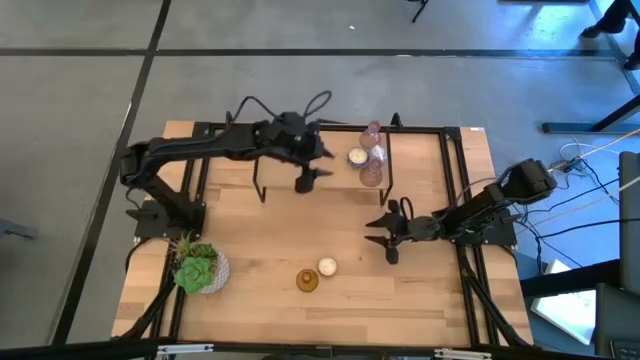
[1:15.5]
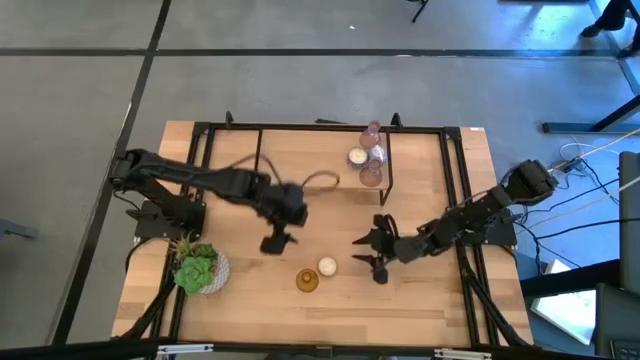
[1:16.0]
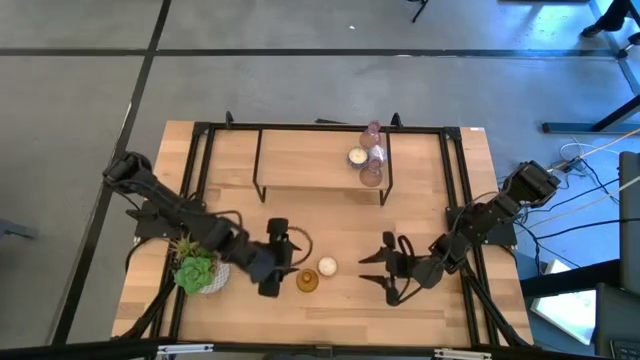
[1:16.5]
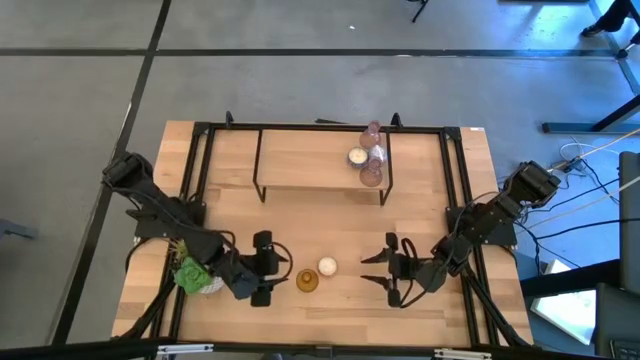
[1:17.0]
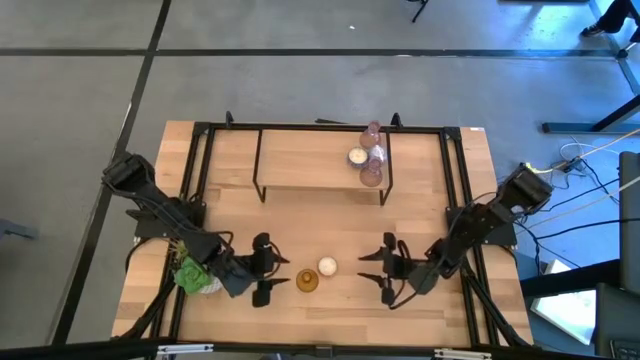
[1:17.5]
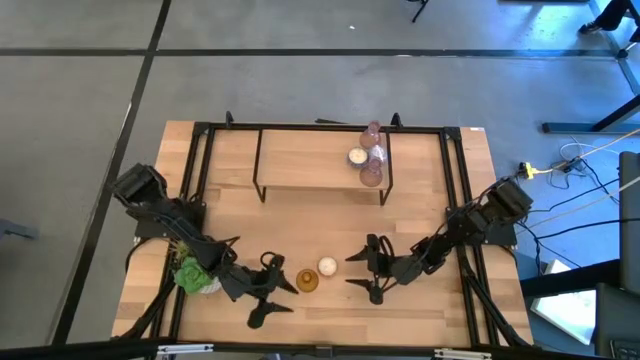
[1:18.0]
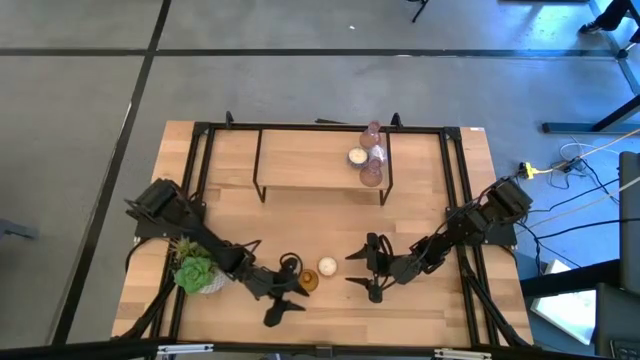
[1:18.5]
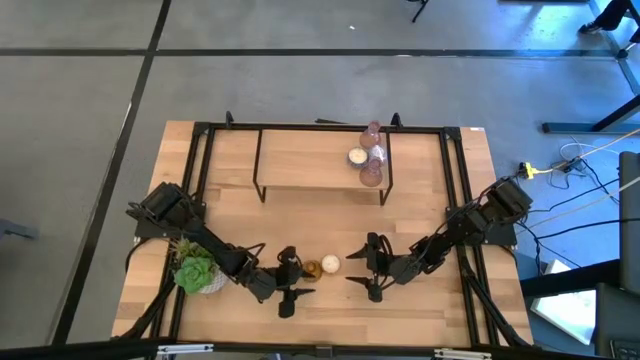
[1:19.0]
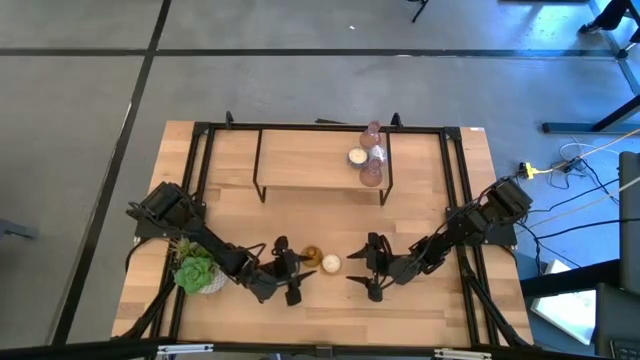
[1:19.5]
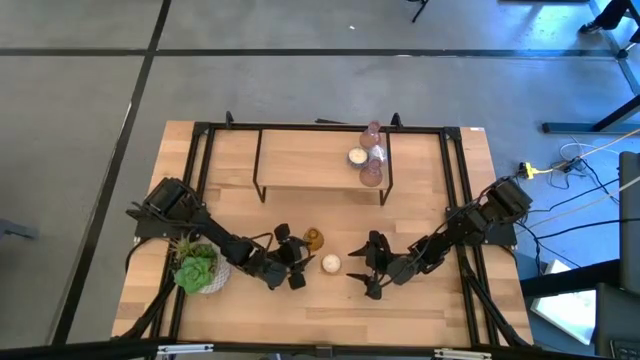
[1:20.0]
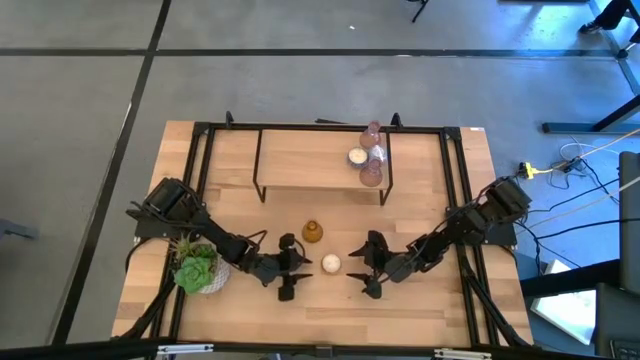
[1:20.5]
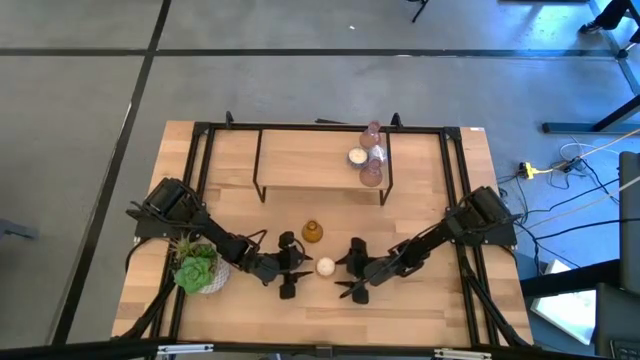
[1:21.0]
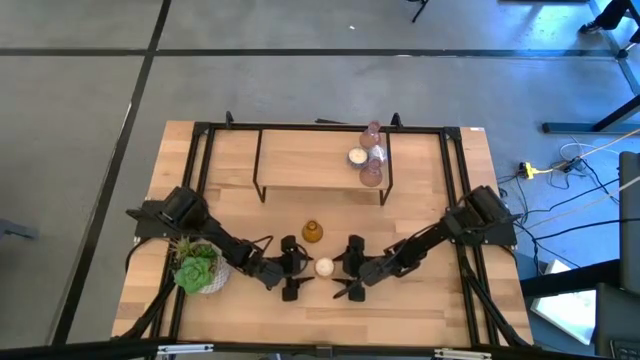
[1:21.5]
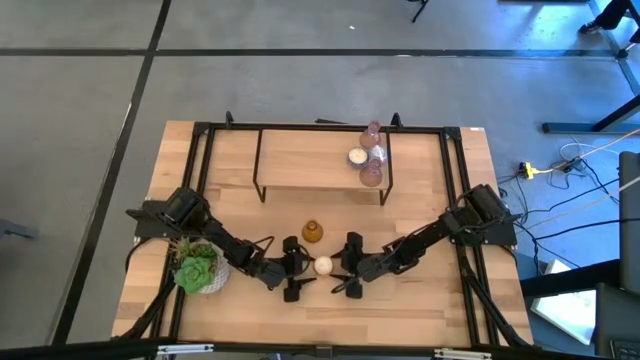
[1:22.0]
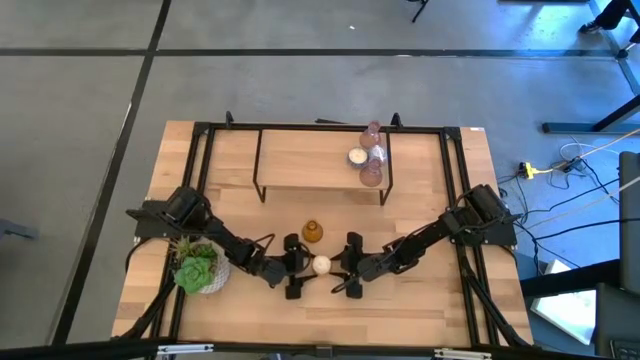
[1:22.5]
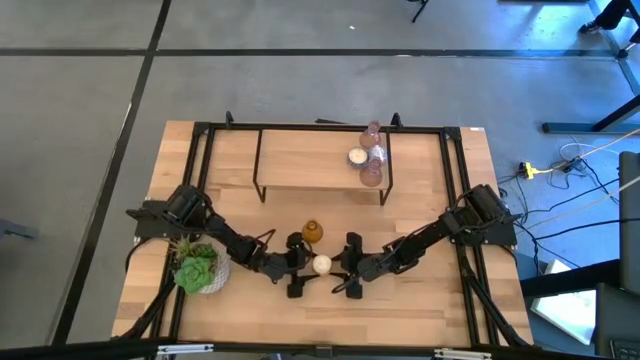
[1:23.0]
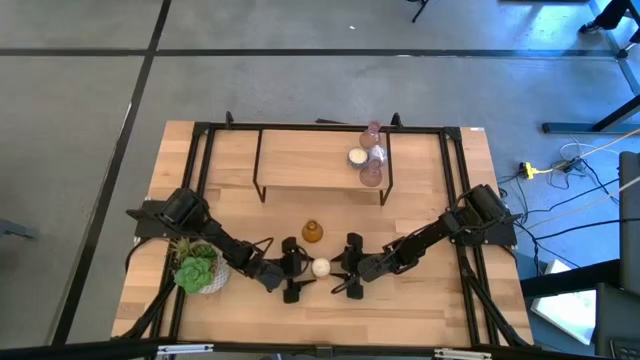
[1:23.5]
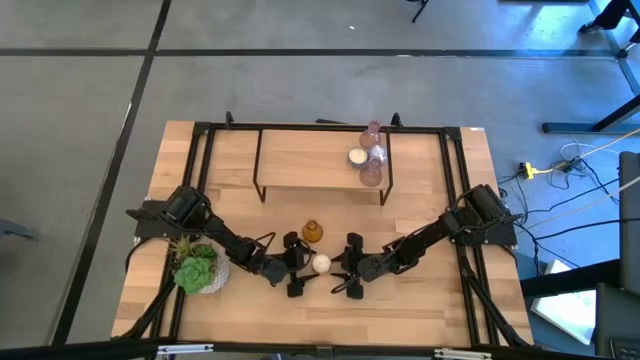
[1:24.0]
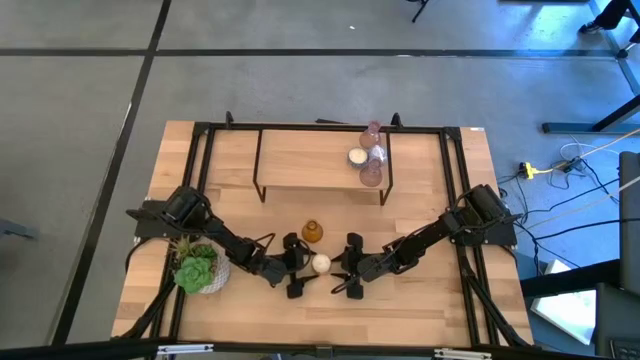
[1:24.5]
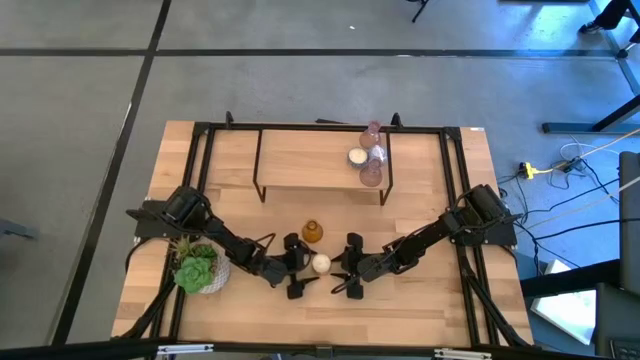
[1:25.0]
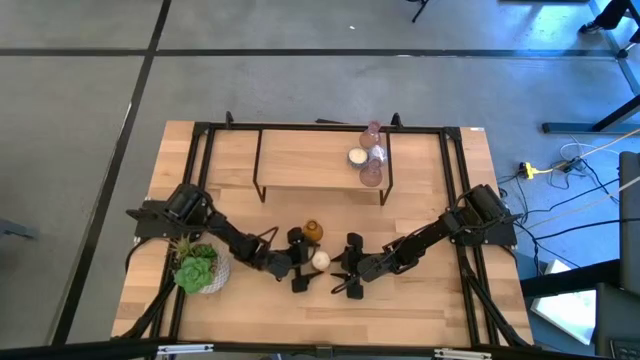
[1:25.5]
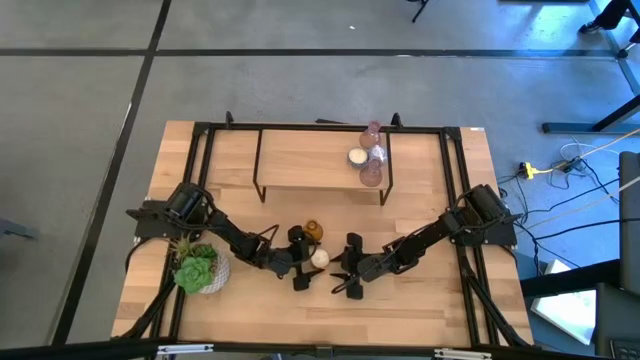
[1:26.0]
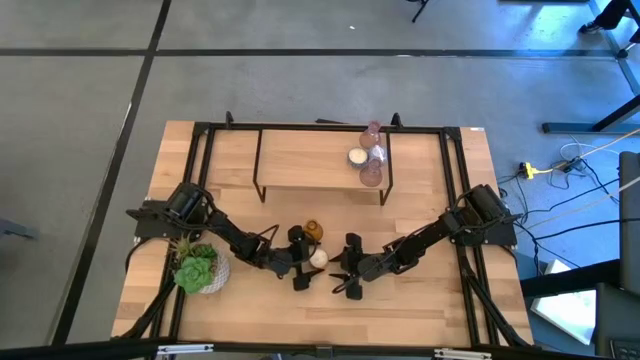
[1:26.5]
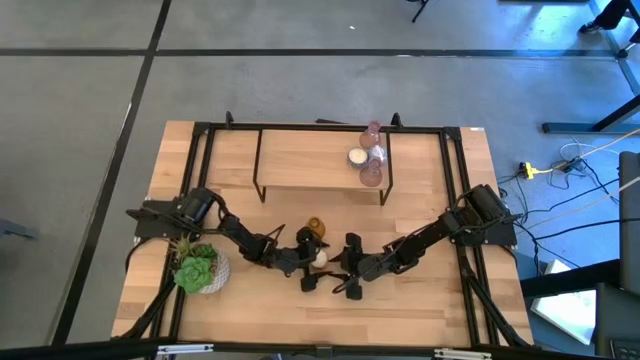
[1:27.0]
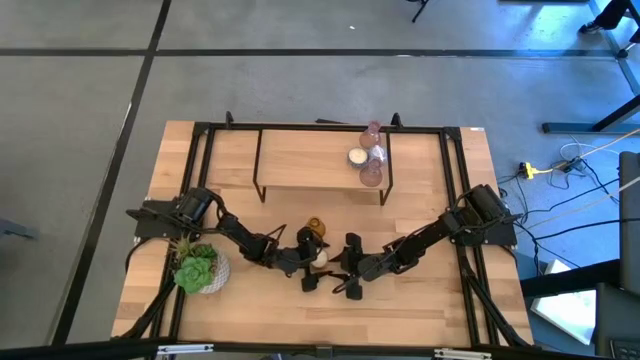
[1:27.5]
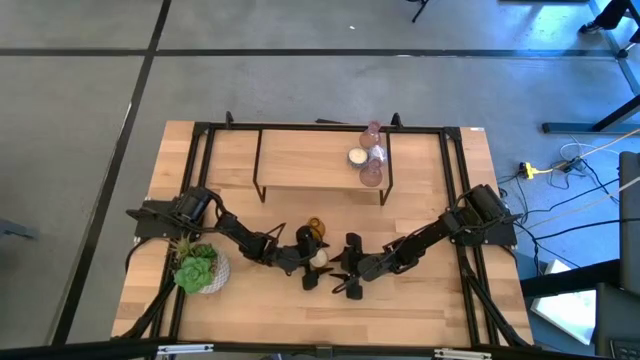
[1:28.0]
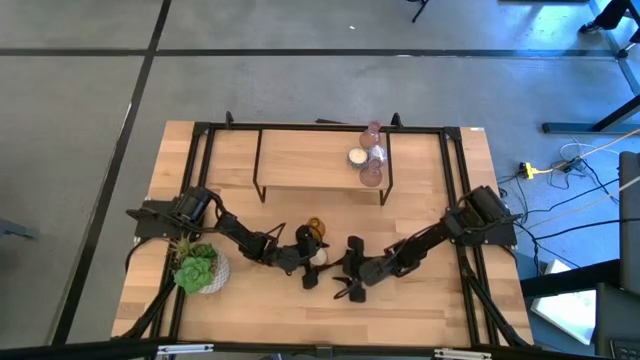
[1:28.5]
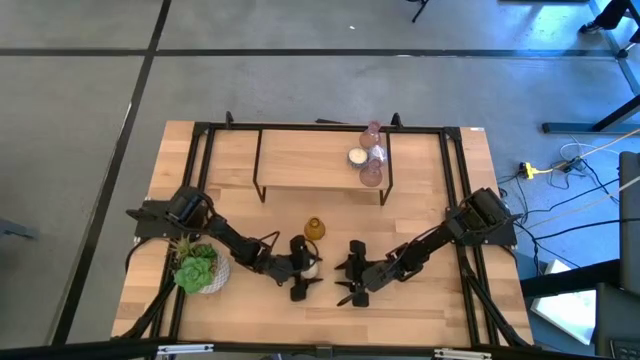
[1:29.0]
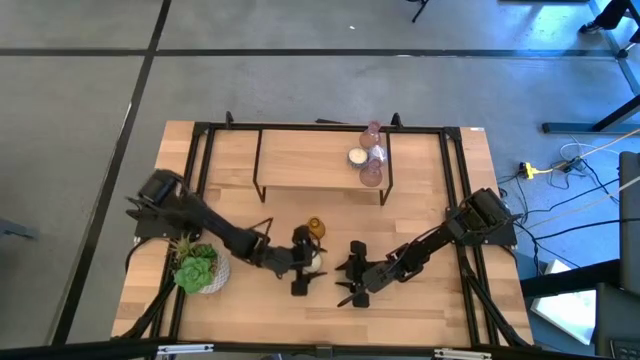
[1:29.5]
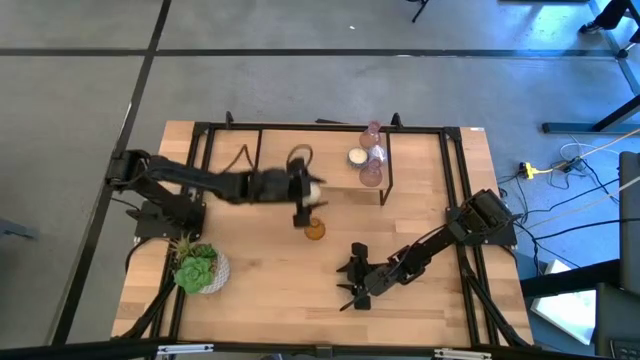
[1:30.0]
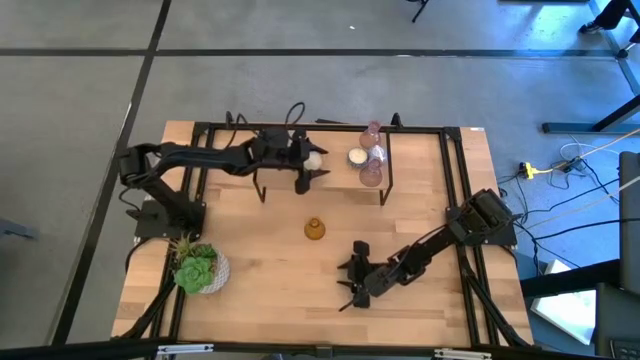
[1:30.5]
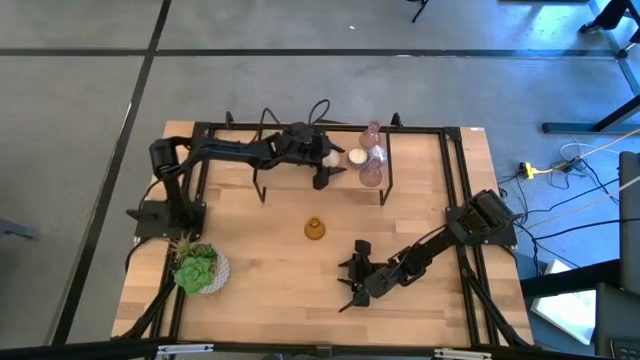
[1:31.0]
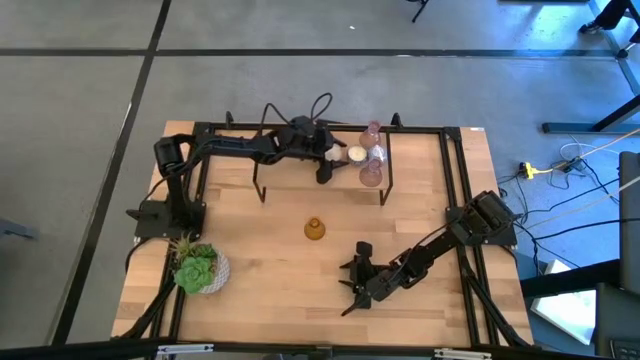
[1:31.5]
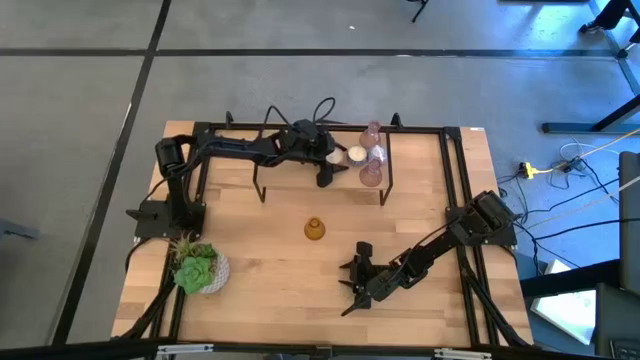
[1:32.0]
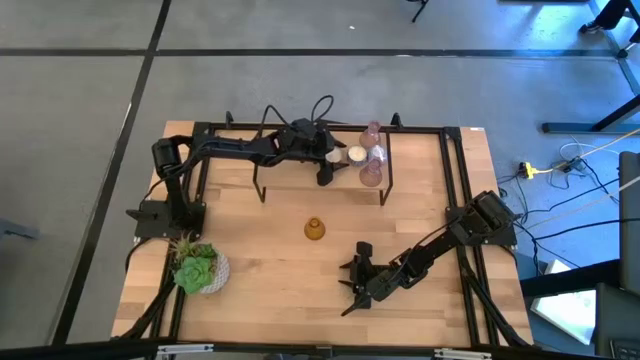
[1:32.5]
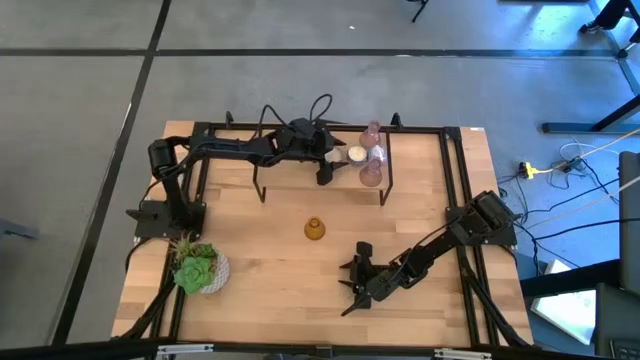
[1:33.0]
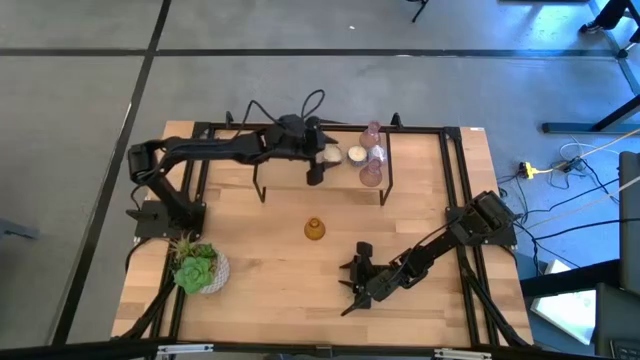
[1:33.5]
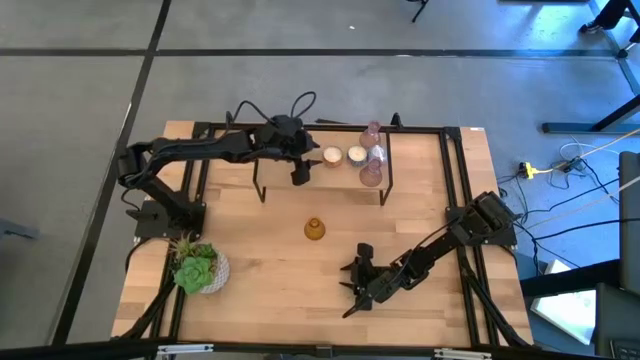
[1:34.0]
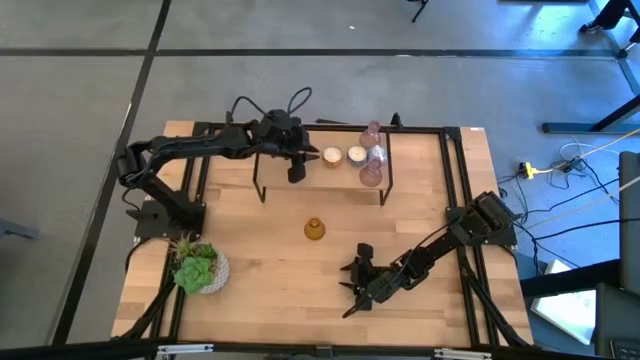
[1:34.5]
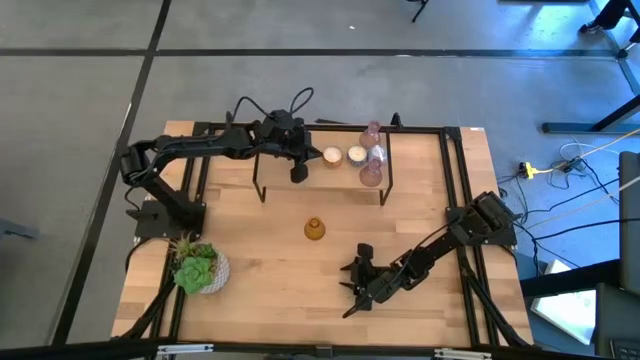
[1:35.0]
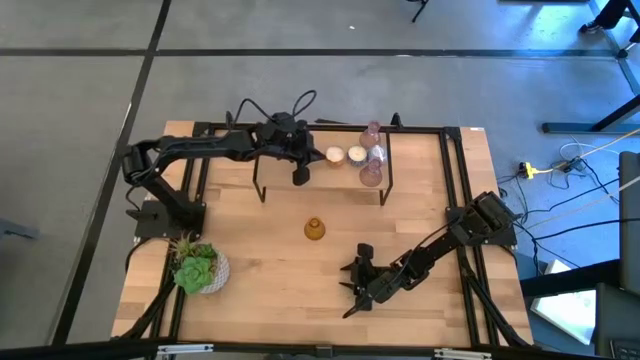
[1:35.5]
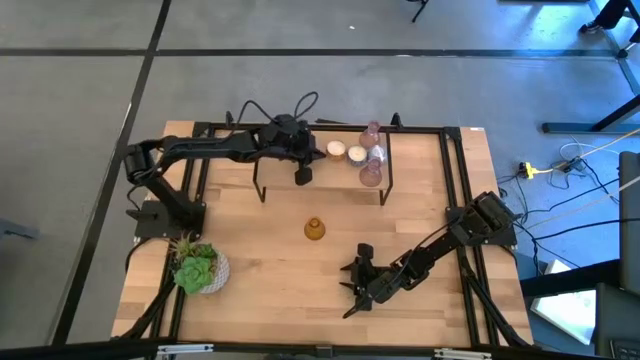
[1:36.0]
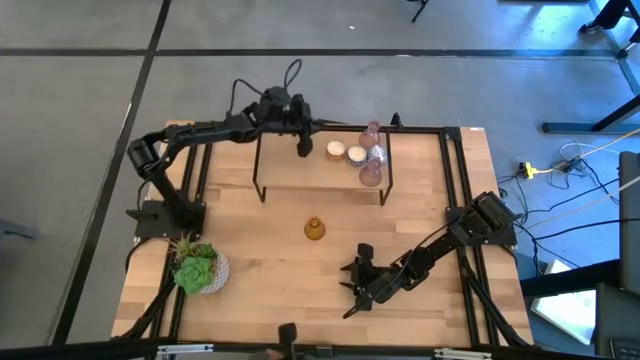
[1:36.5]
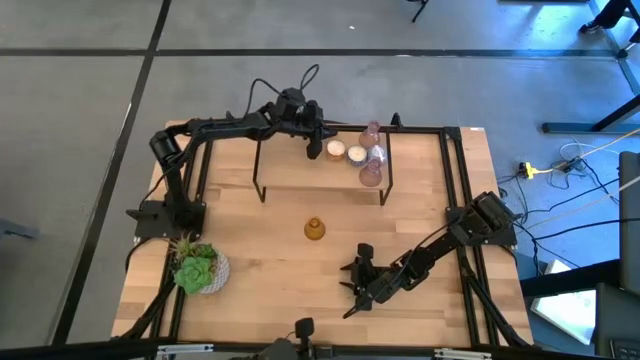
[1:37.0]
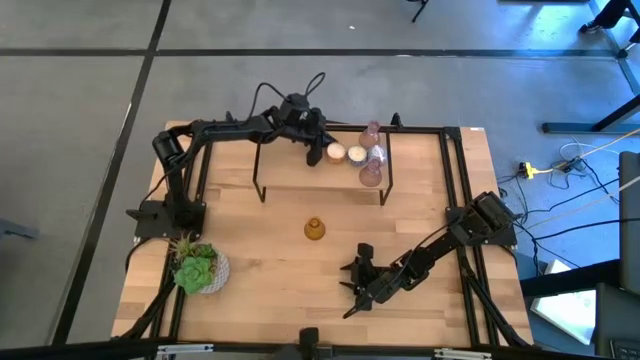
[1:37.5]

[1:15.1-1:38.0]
Task: Pick & Place candle stick holders
Adjust the yellow glass candle holder on the table
